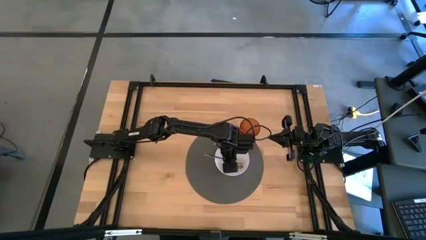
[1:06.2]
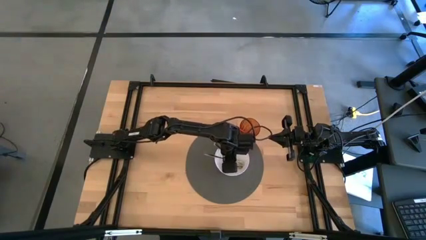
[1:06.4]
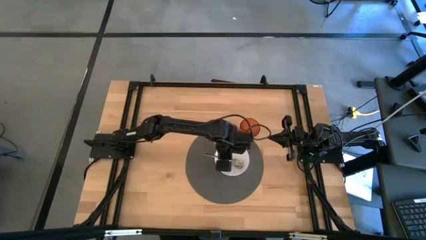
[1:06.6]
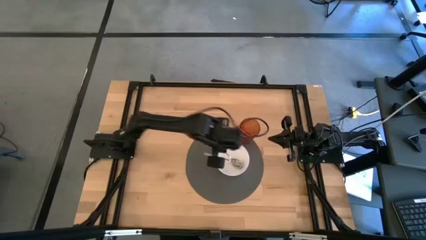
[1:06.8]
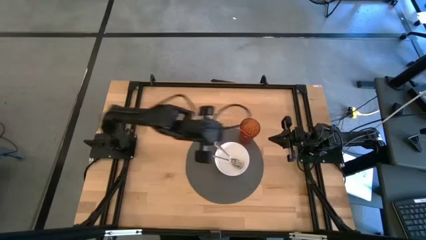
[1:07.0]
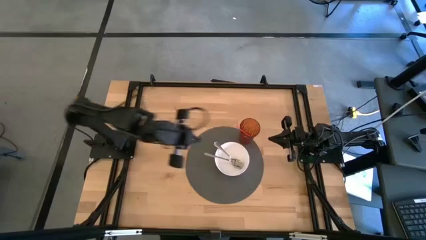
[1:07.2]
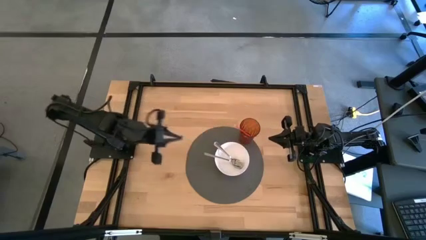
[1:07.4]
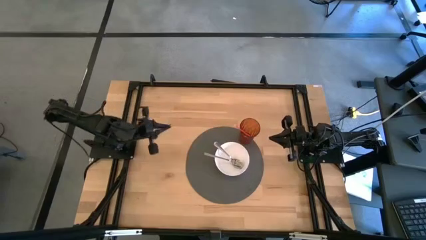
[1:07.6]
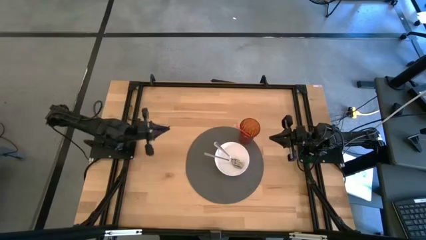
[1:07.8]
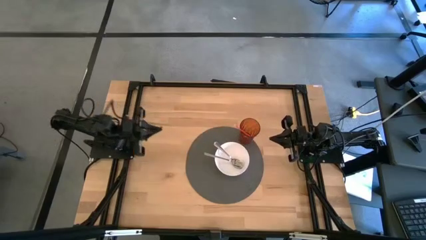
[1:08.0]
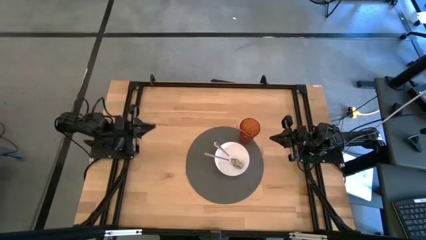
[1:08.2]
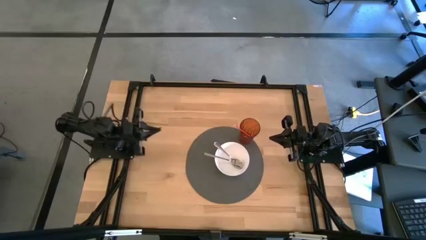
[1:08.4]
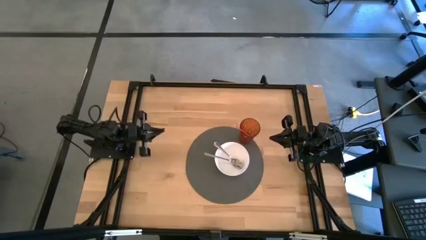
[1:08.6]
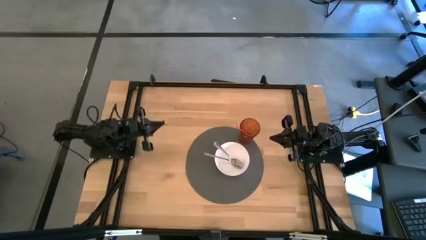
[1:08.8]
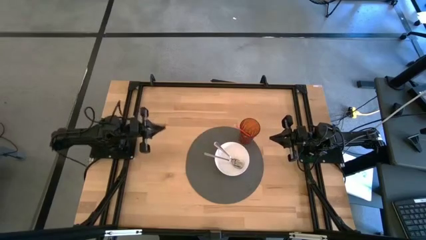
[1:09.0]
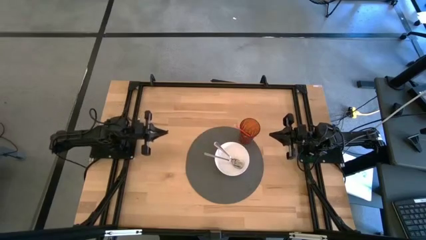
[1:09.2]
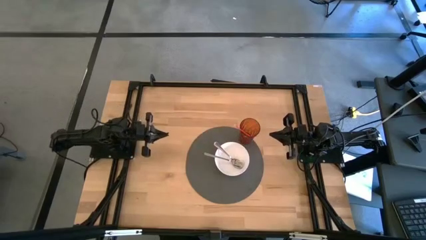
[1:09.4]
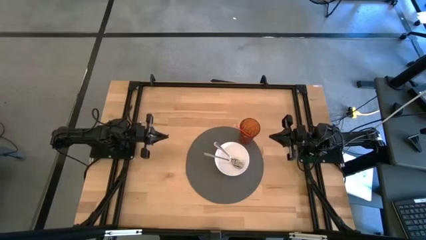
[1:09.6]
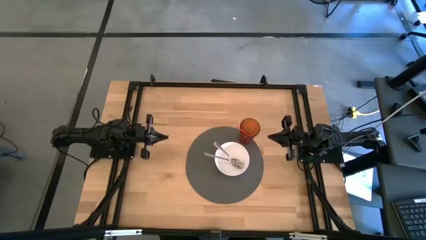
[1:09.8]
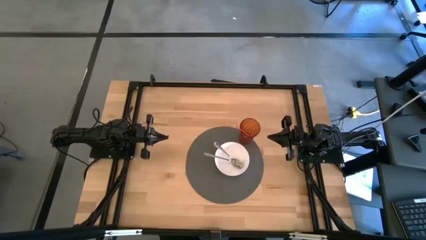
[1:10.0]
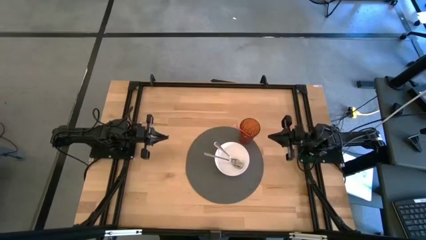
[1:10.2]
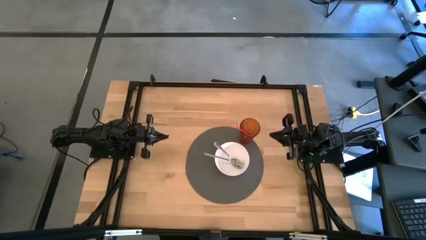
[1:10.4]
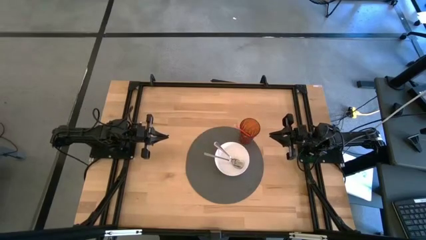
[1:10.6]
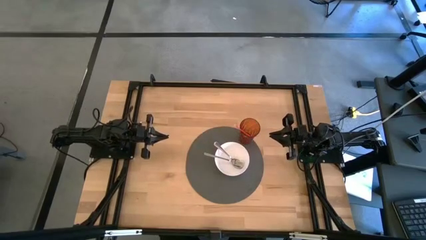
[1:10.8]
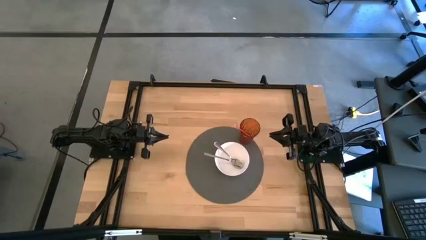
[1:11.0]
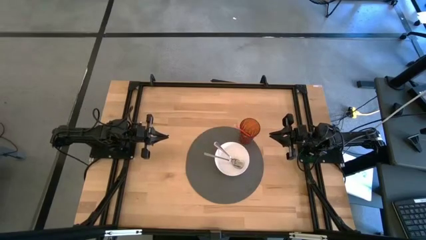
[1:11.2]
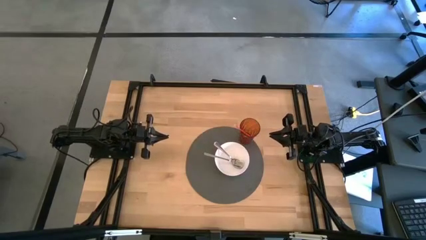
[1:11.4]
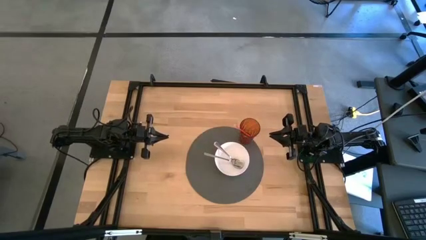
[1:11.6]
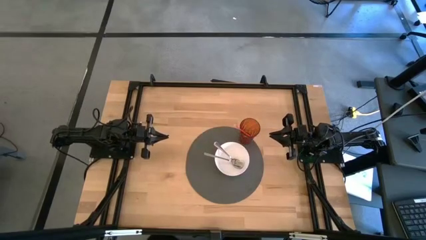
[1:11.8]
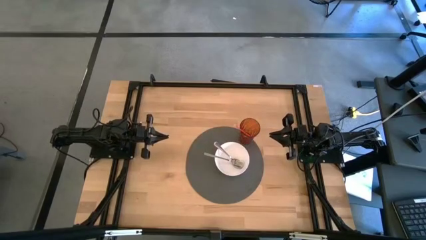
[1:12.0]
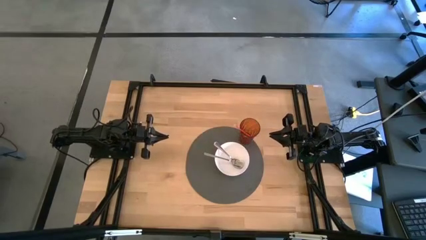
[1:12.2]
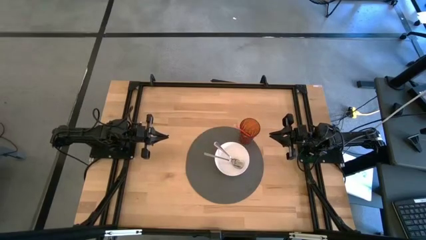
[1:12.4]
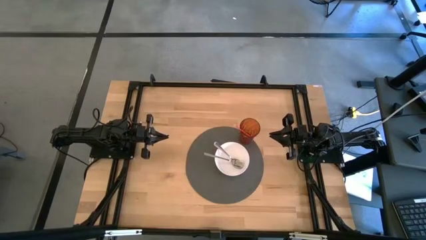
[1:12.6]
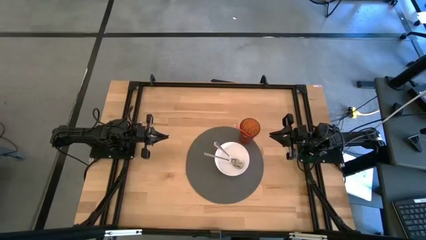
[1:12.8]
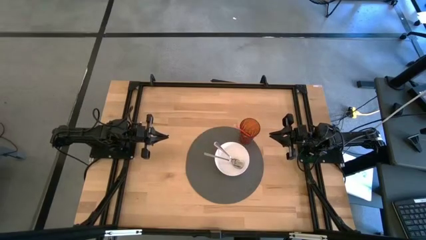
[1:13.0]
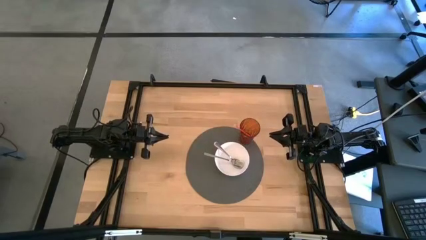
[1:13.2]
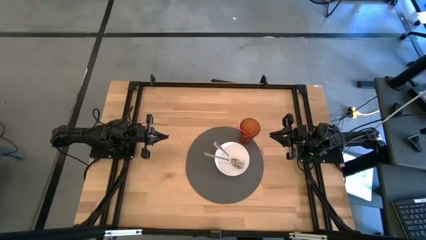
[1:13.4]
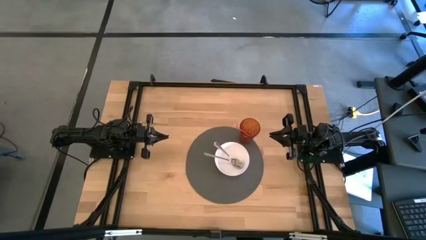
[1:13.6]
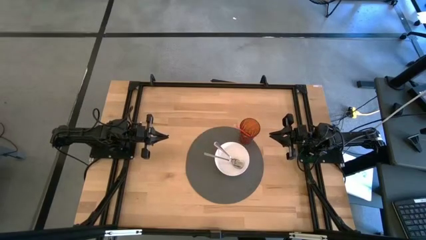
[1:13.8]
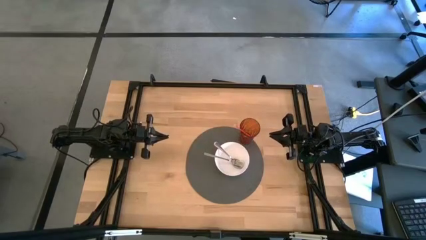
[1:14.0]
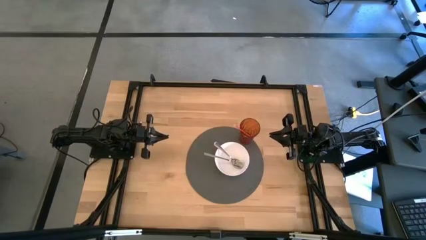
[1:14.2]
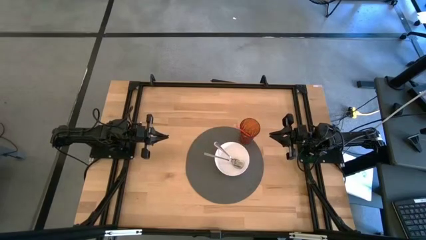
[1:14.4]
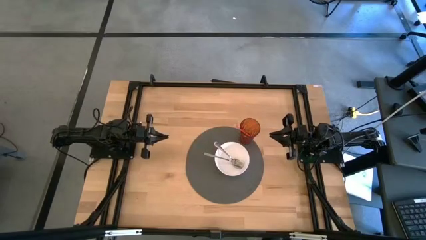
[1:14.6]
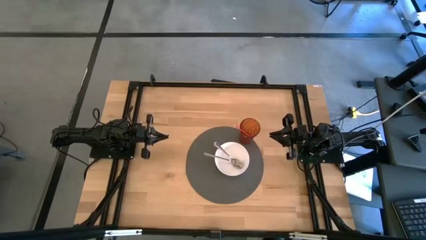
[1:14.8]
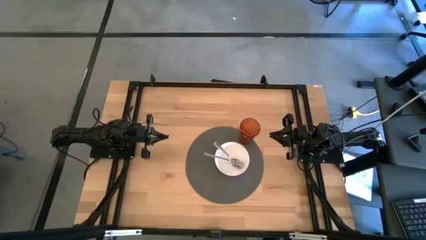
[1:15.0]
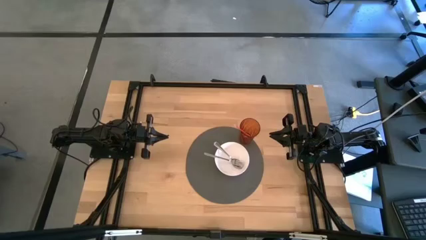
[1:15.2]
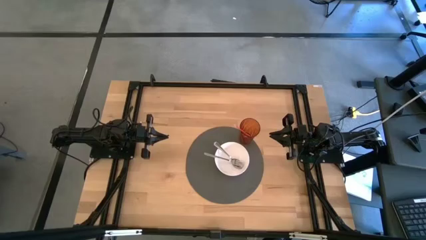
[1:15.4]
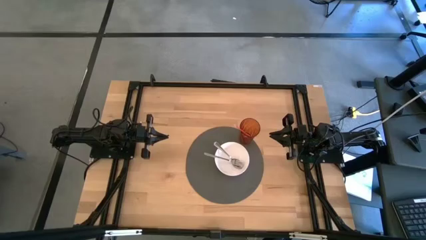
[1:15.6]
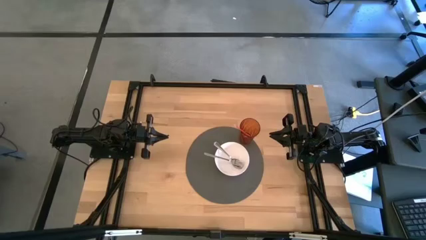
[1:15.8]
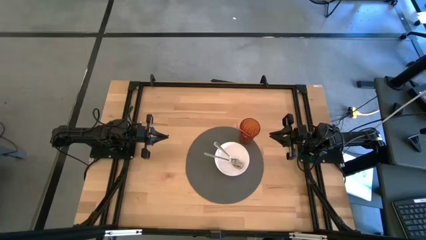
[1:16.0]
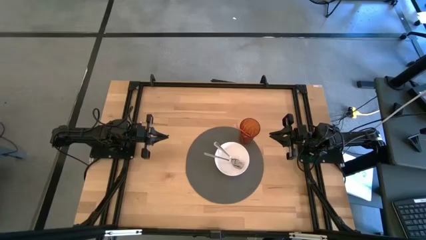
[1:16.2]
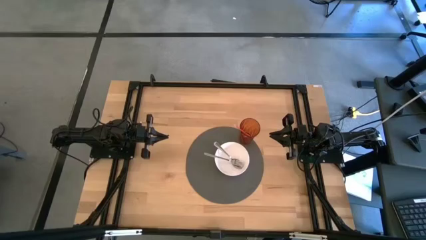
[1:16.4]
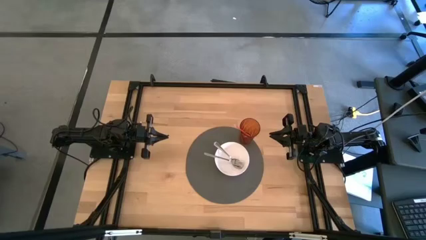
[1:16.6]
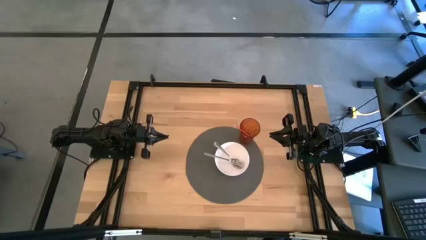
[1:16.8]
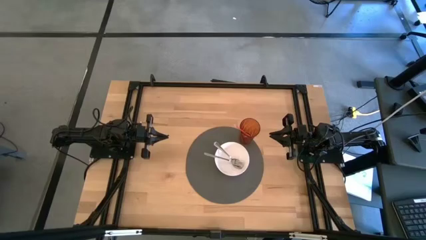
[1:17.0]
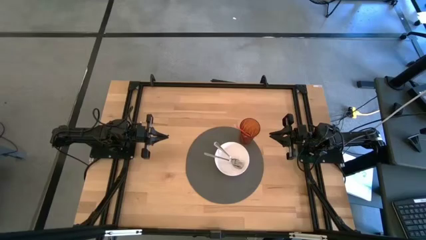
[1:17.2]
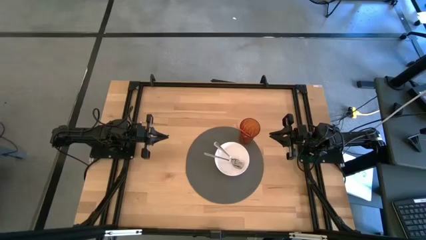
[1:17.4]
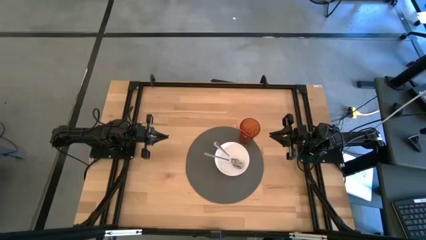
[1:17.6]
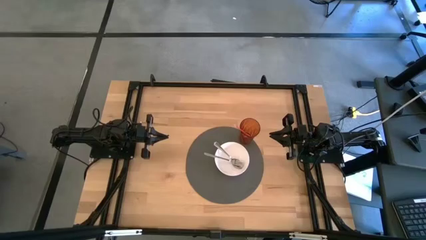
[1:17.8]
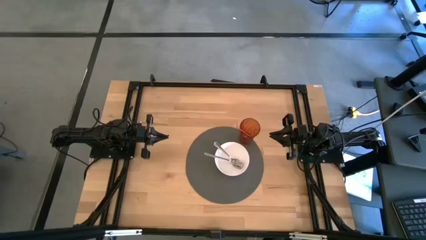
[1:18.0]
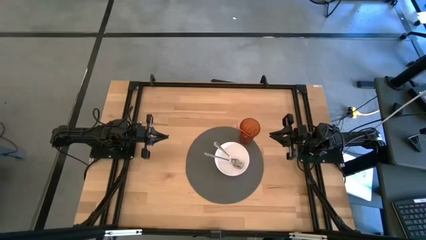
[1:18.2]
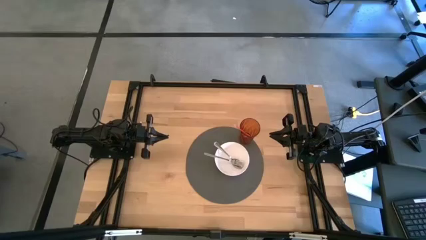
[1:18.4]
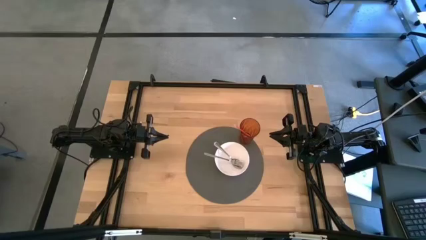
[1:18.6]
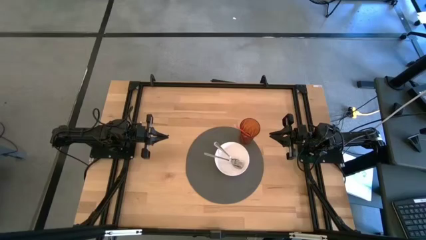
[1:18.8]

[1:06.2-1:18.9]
Task: Pick & Place Utensil
Return to Home Position
